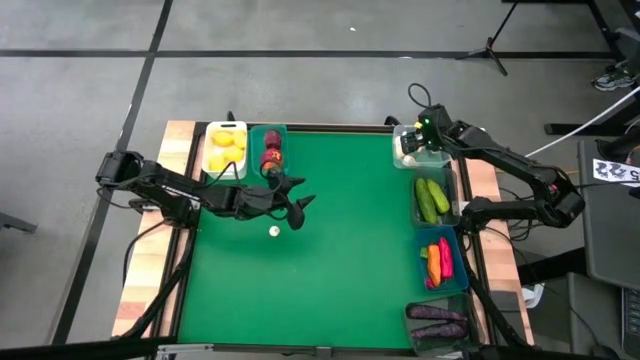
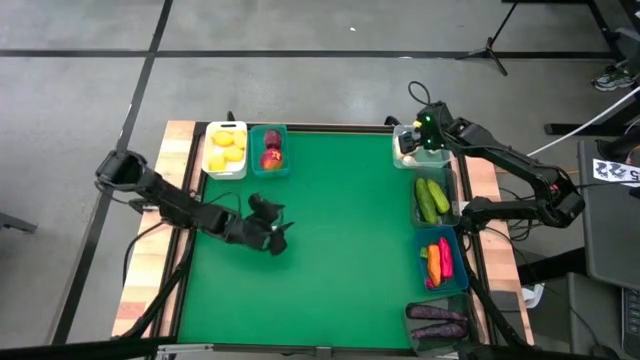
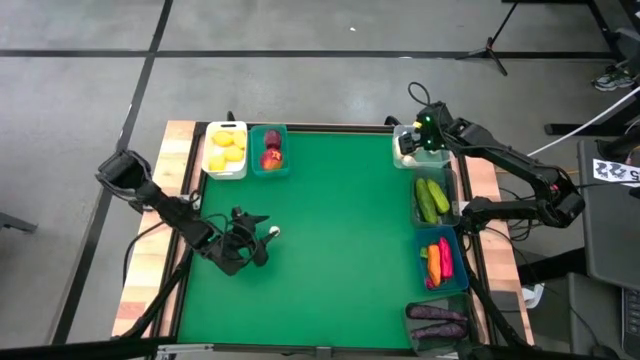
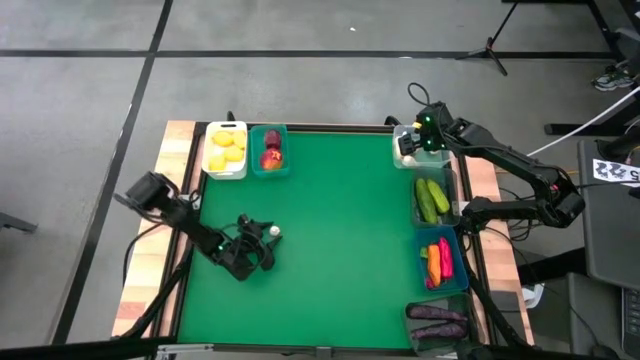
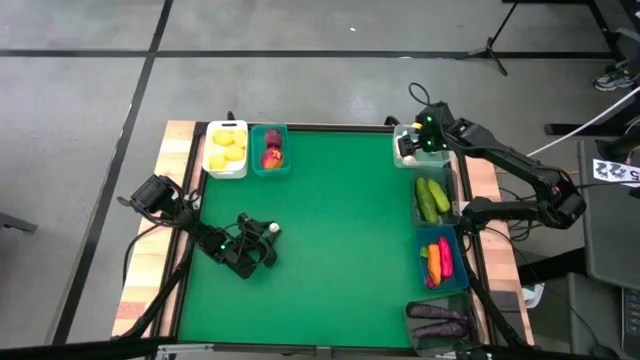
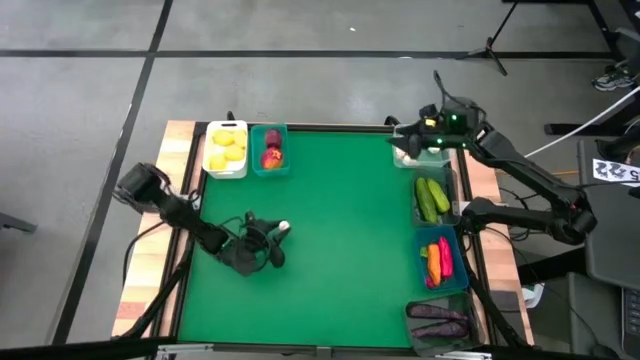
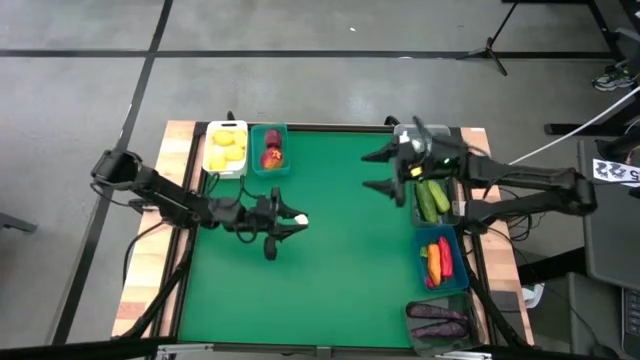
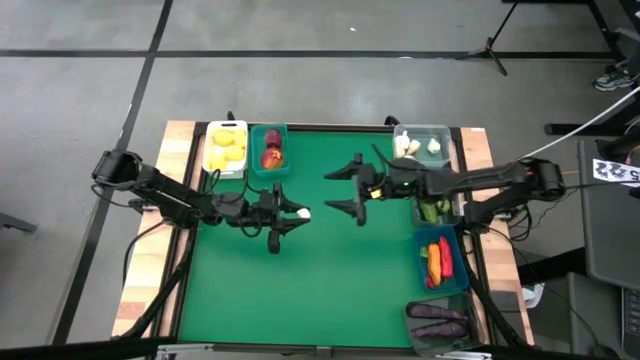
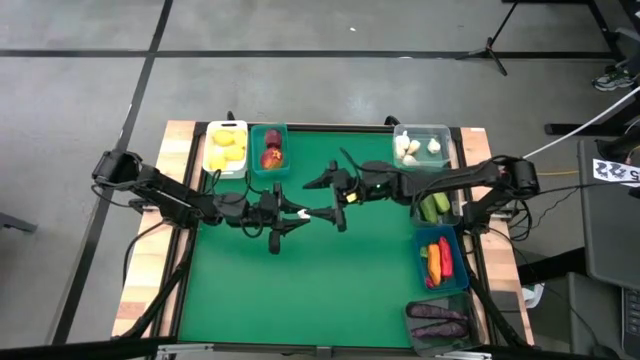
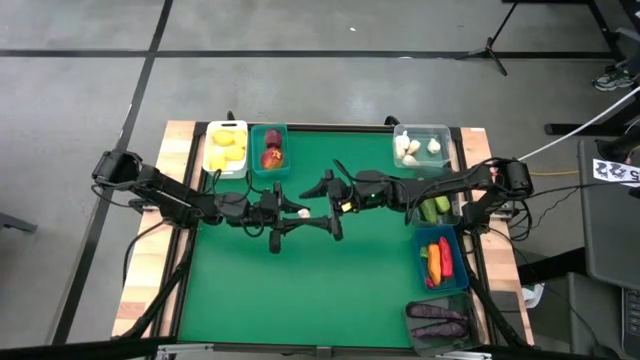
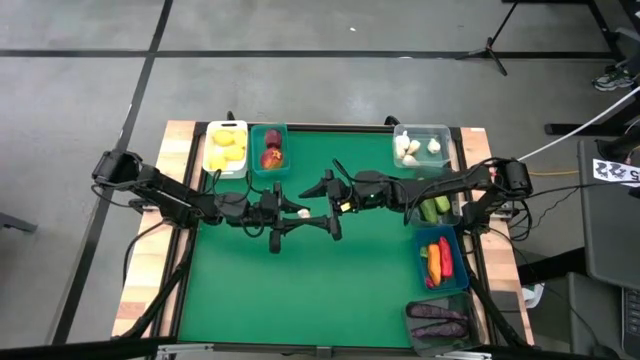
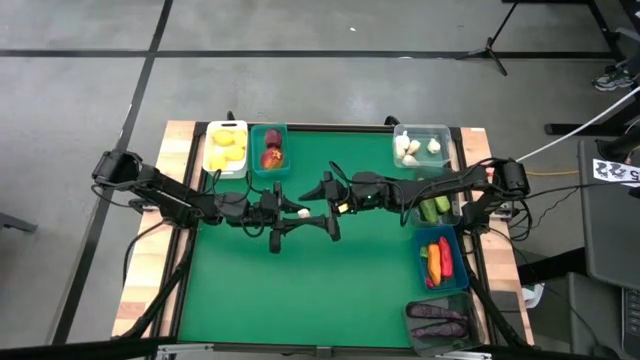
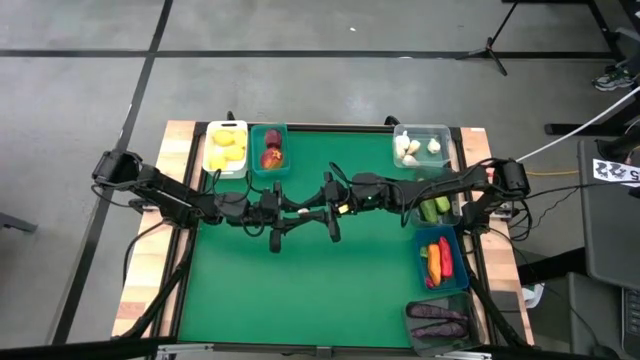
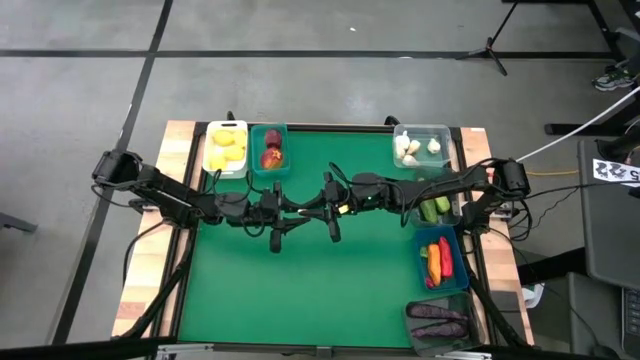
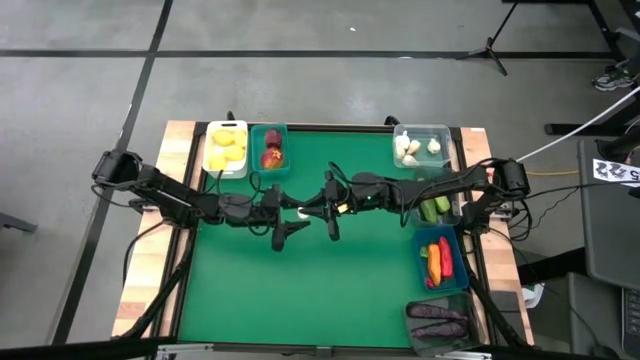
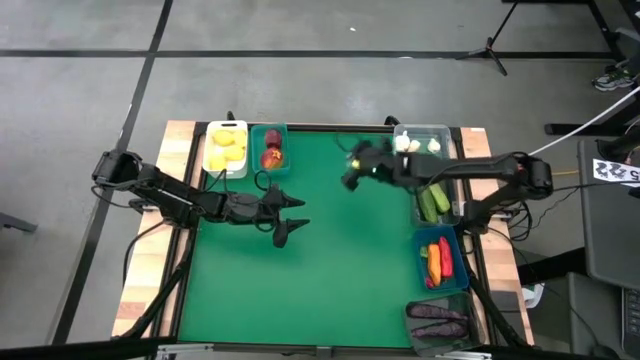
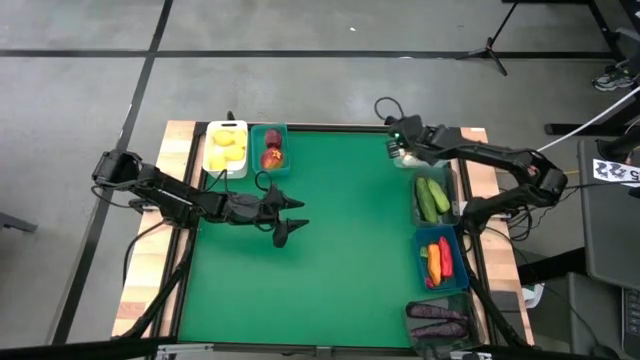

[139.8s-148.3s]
Task: Sort produce into baskets
Put the white garlic into the transparent bin

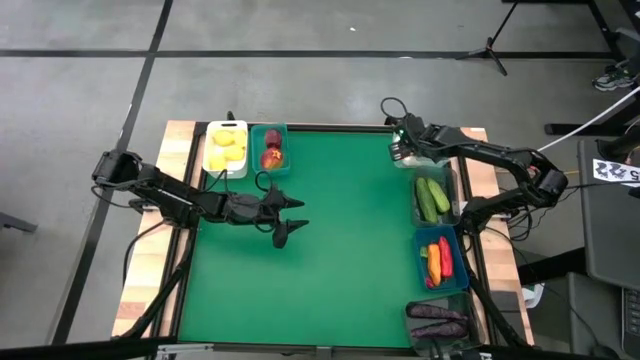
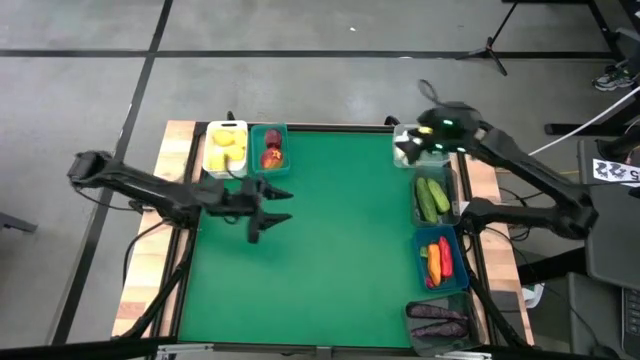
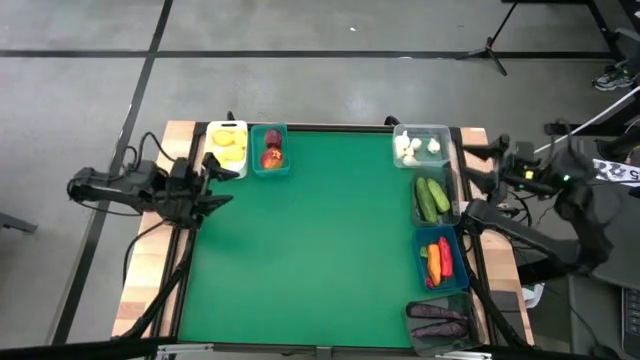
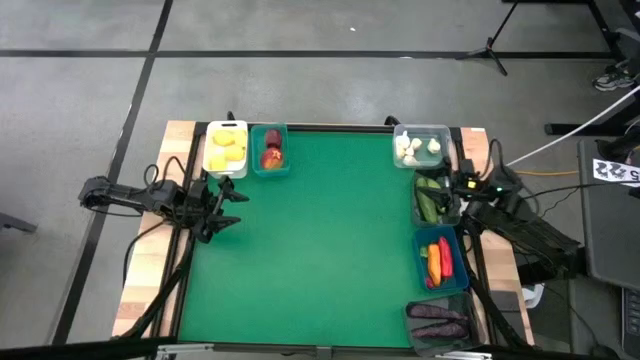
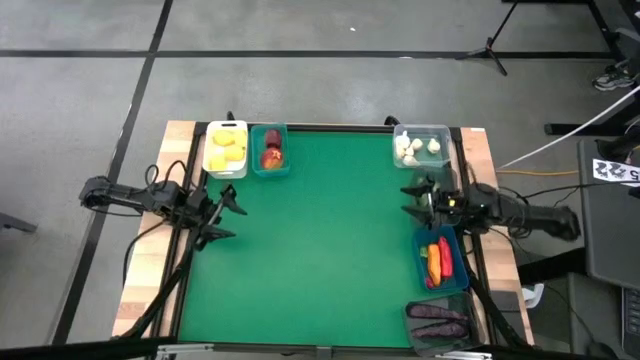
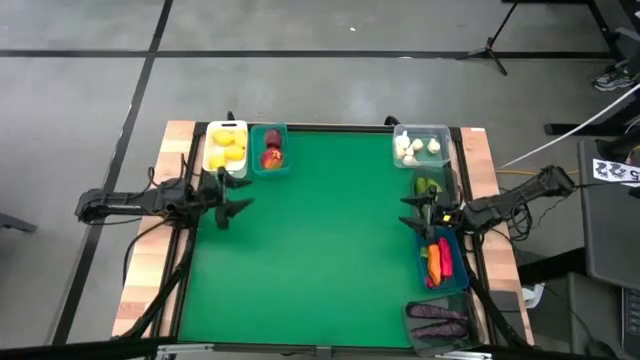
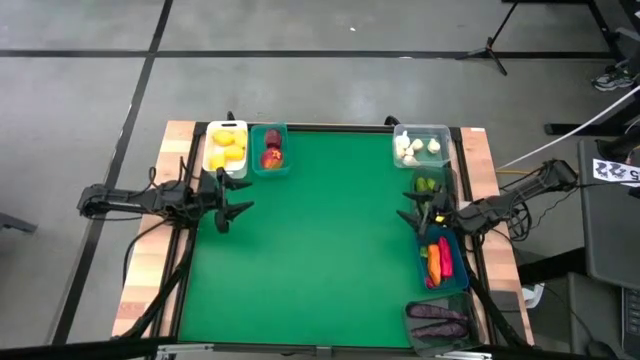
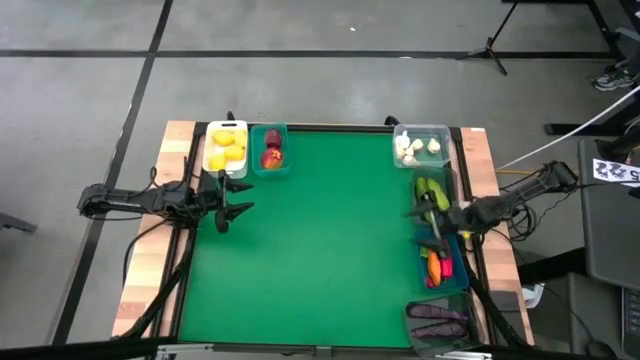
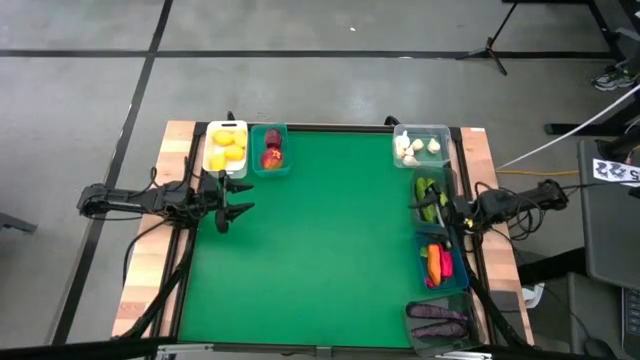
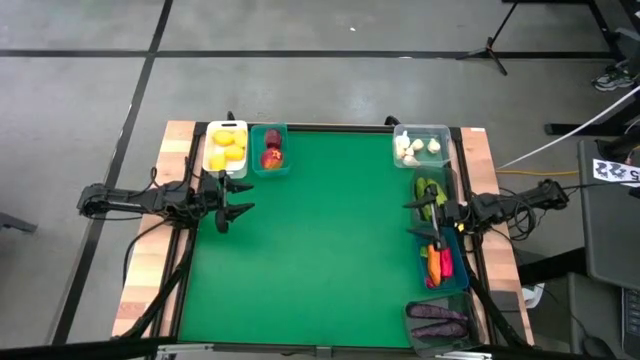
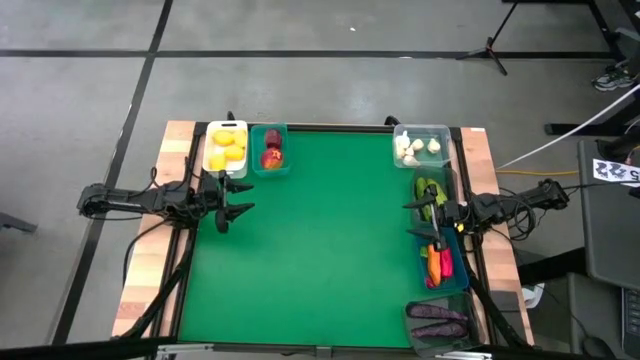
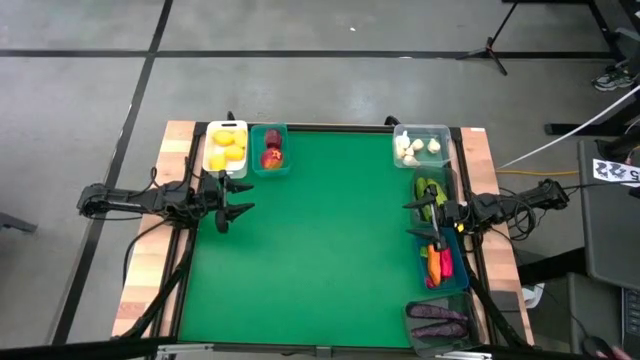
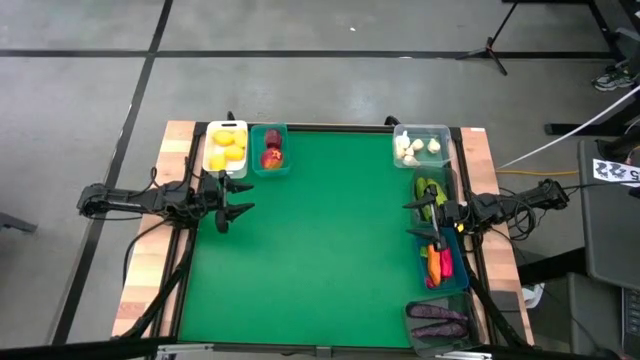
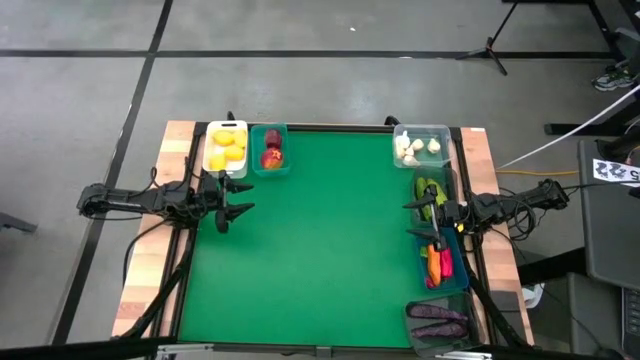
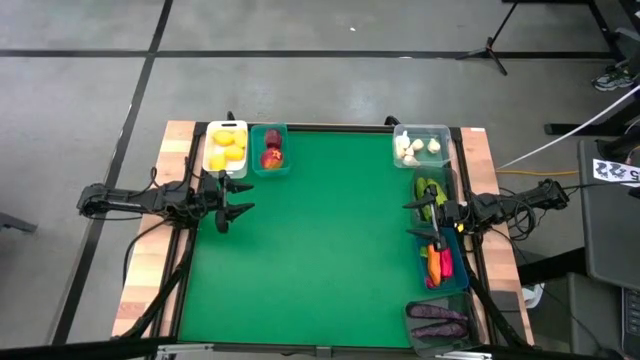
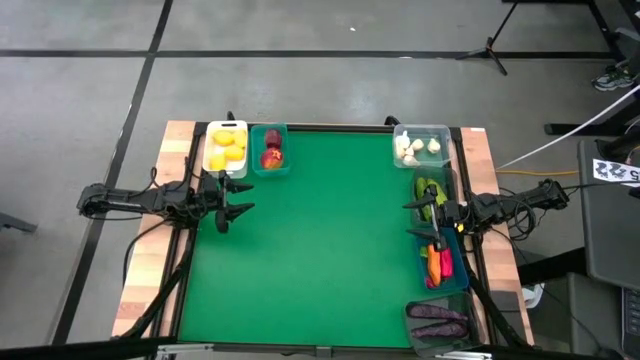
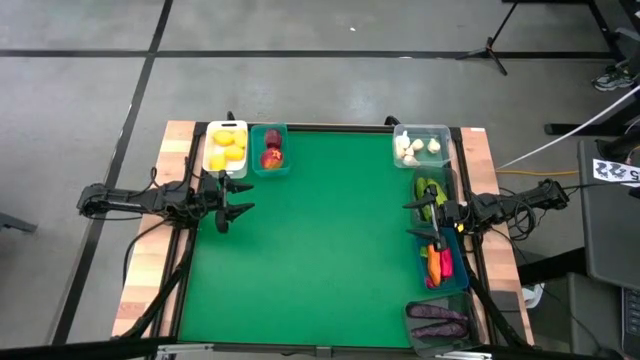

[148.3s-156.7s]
Return to Home Position

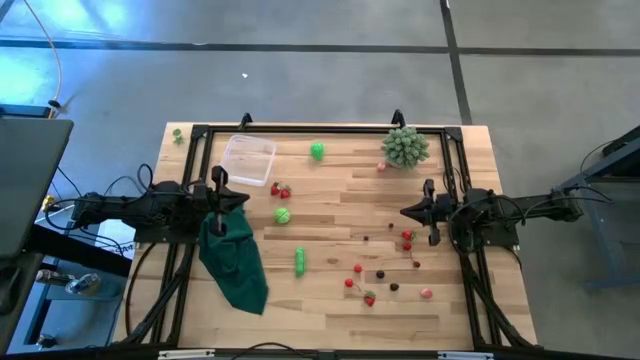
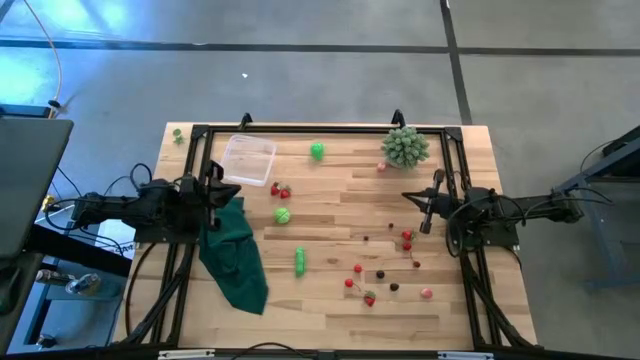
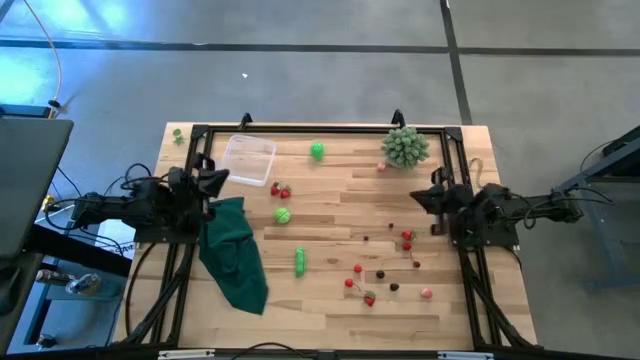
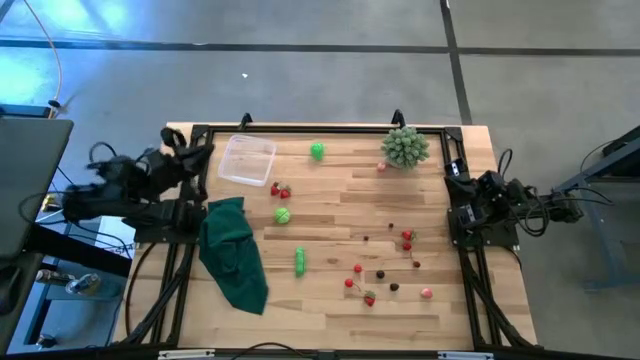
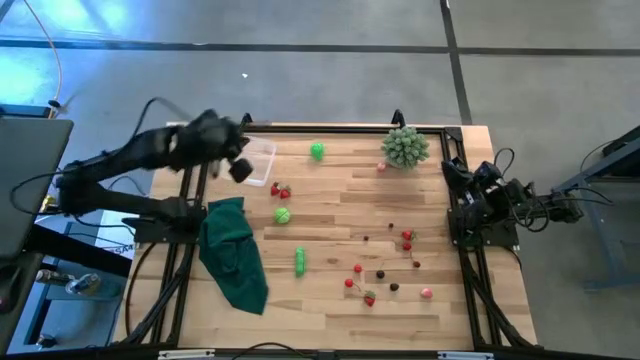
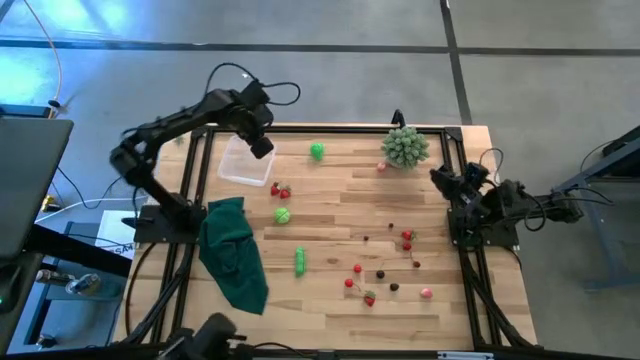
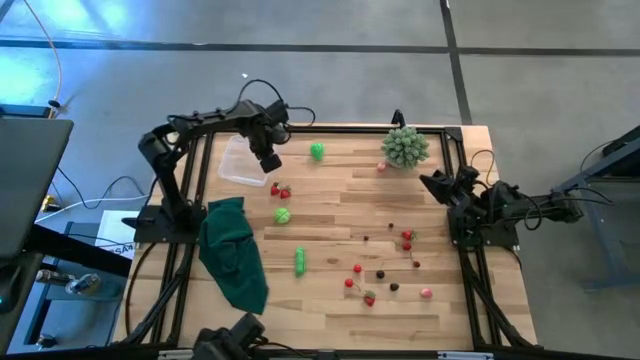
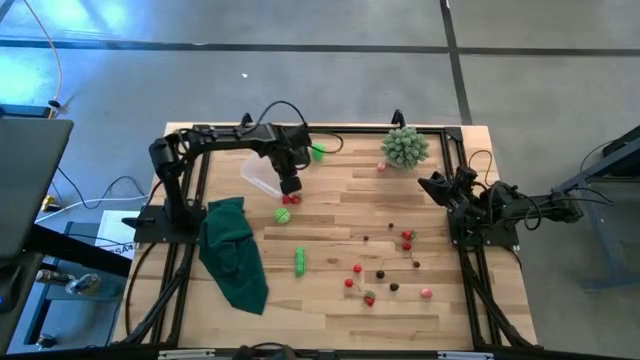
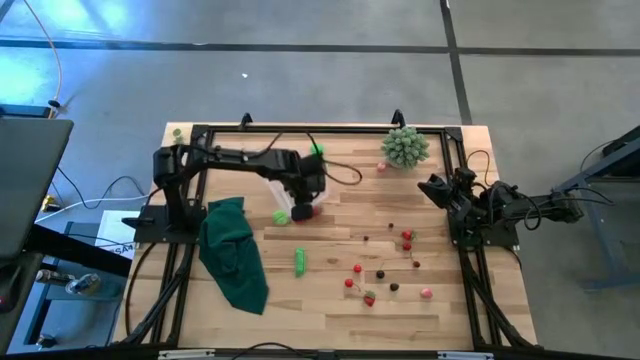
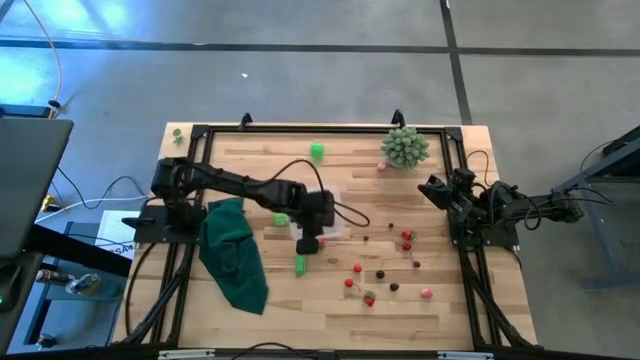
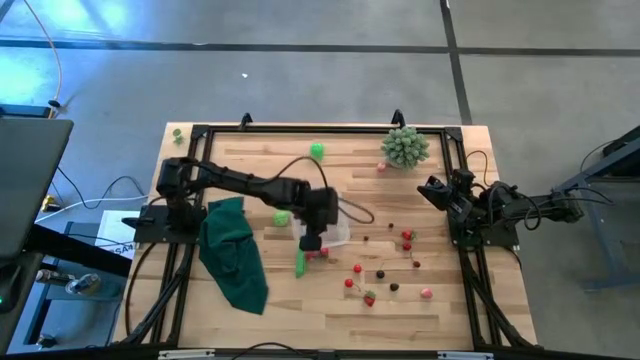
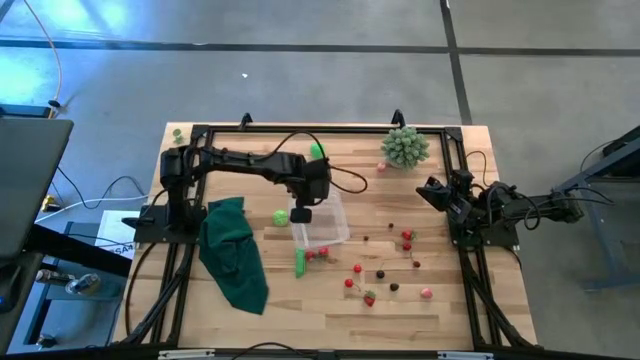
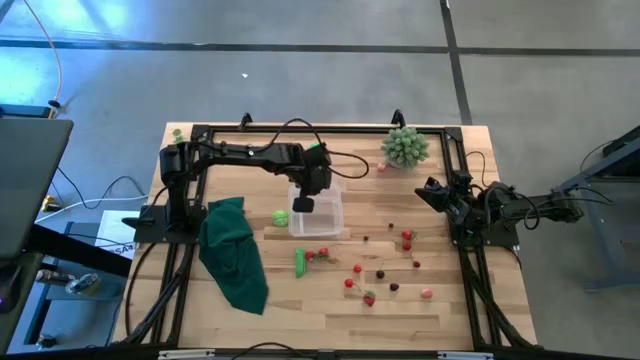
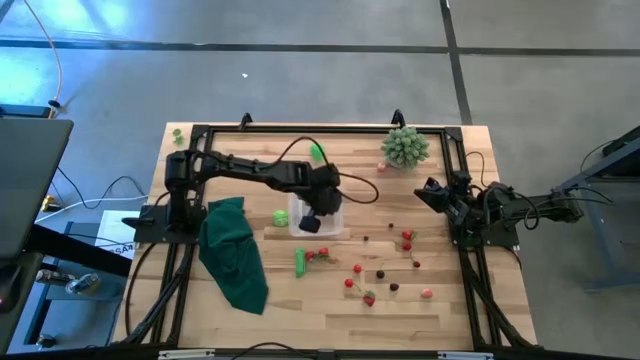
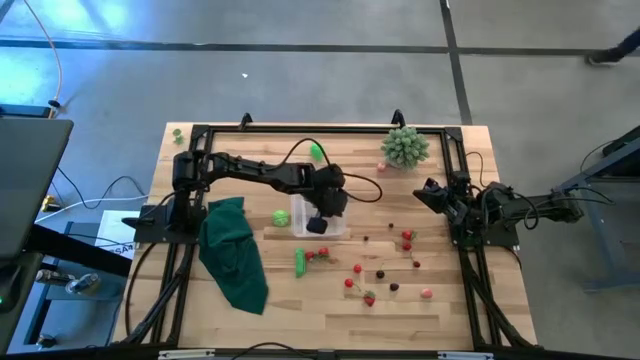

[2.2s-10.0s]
Task: Pick and placing Produce into tupperware
Move the transparent bin to the center of the table
